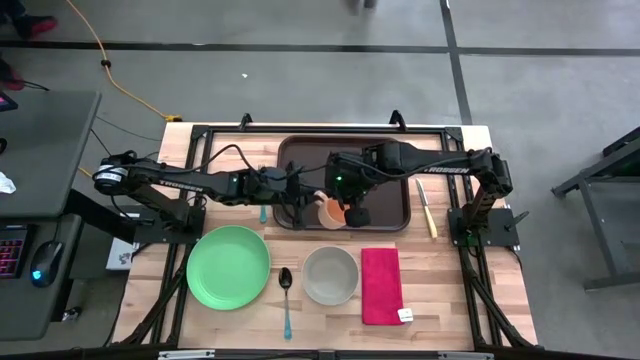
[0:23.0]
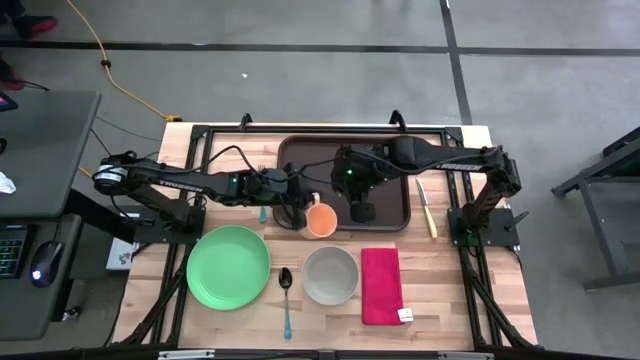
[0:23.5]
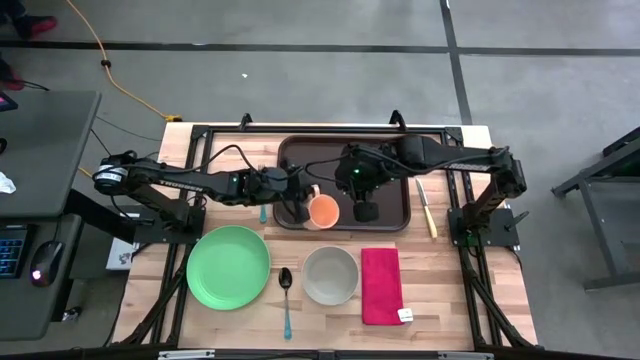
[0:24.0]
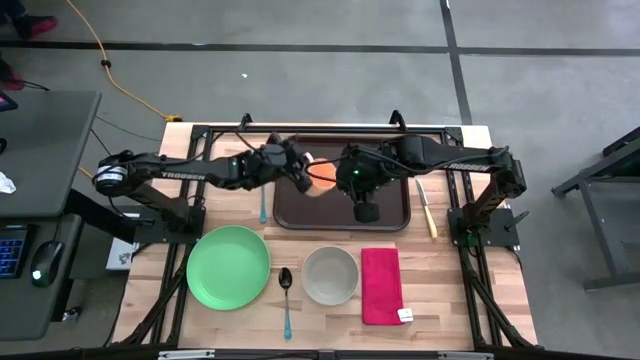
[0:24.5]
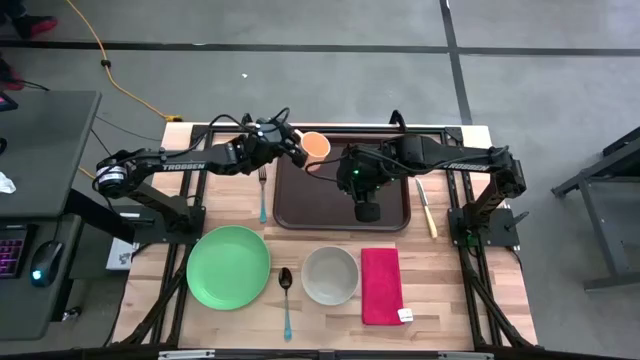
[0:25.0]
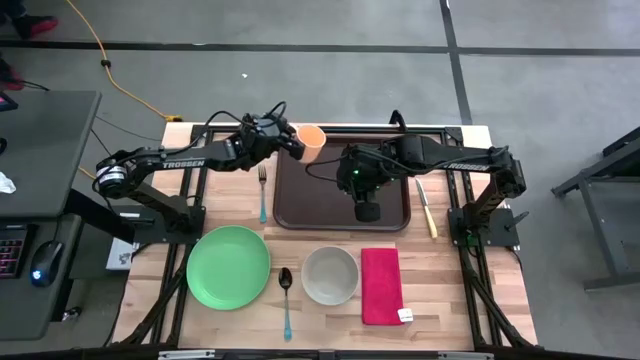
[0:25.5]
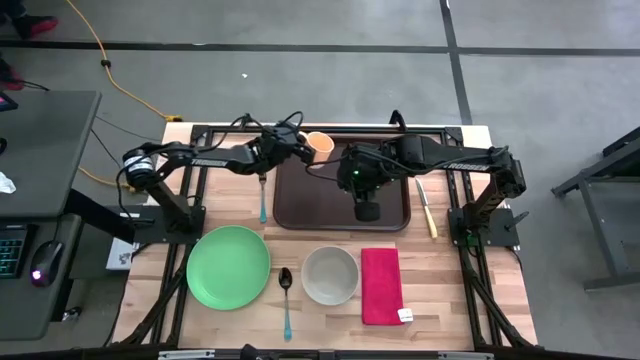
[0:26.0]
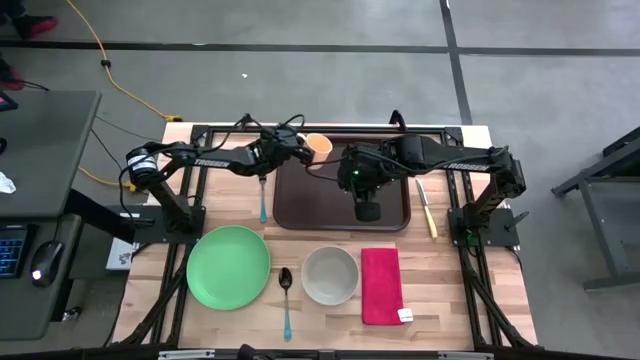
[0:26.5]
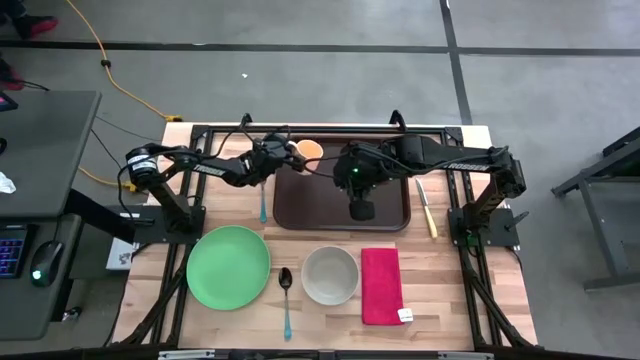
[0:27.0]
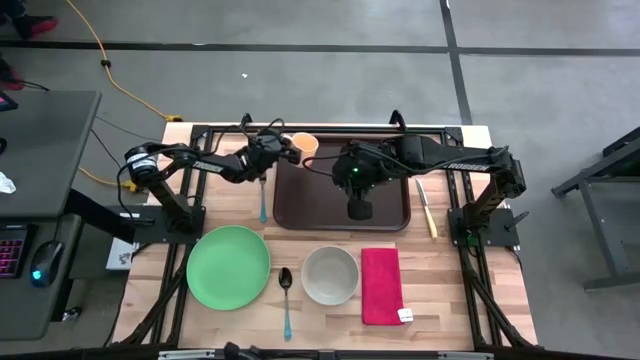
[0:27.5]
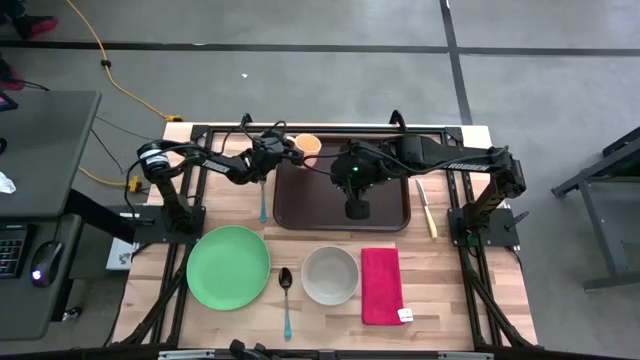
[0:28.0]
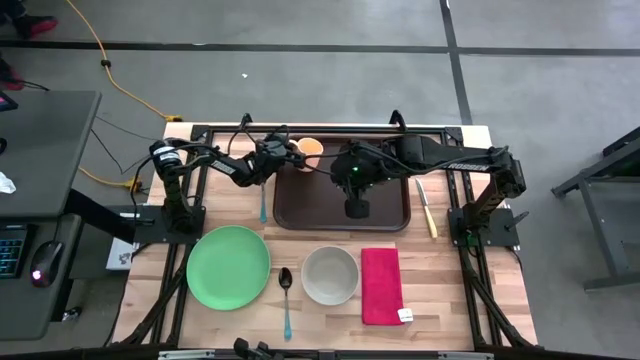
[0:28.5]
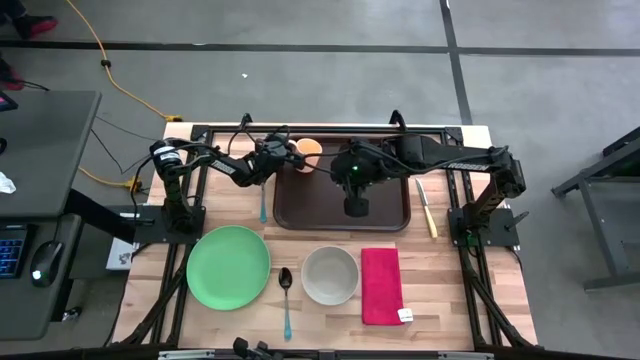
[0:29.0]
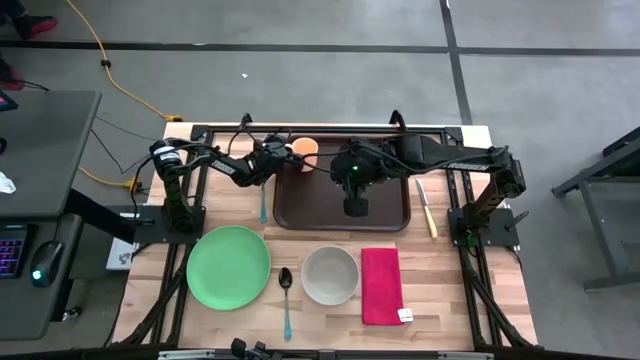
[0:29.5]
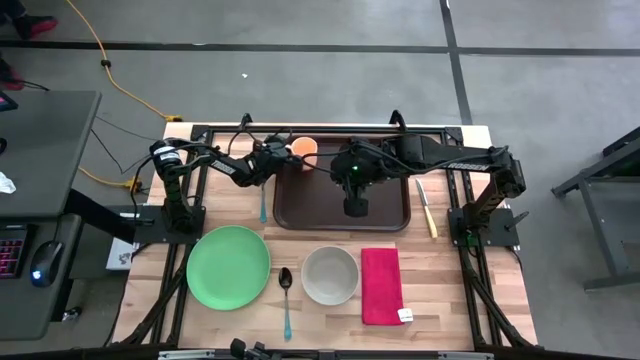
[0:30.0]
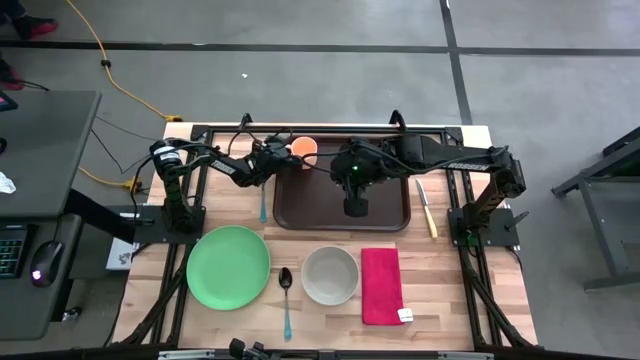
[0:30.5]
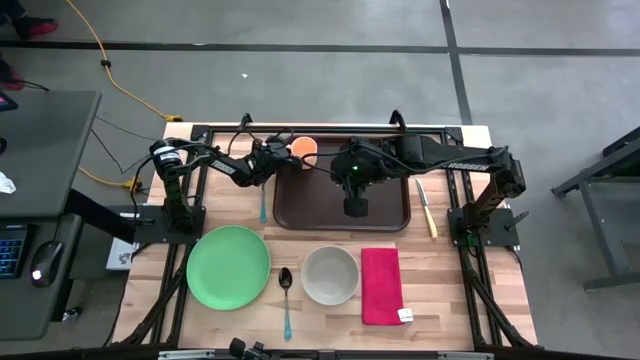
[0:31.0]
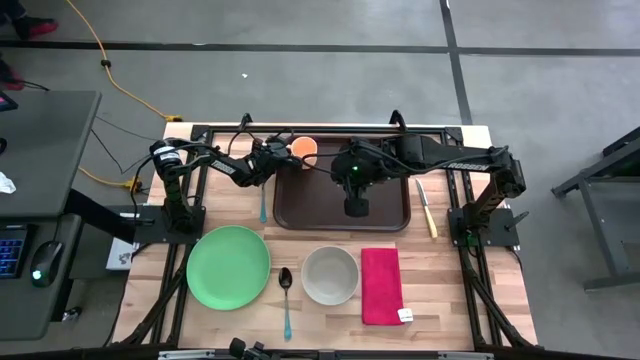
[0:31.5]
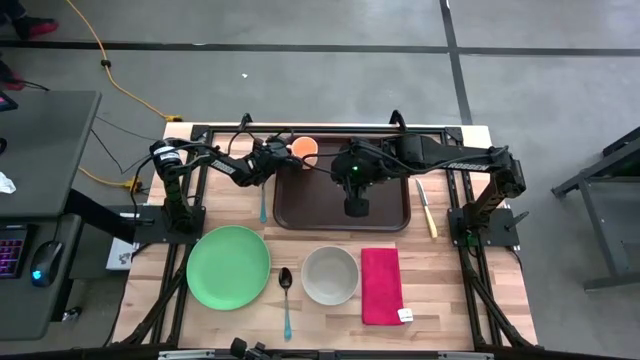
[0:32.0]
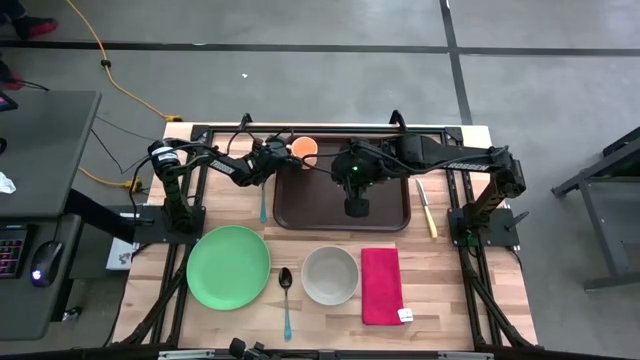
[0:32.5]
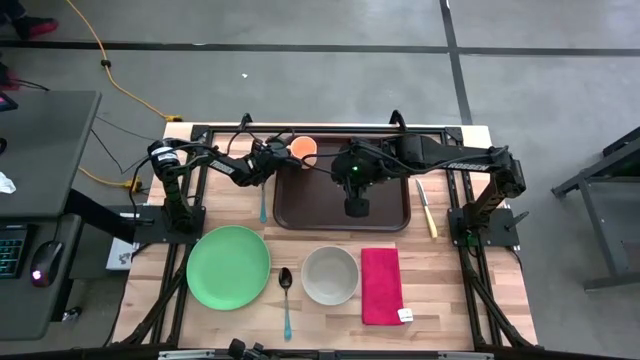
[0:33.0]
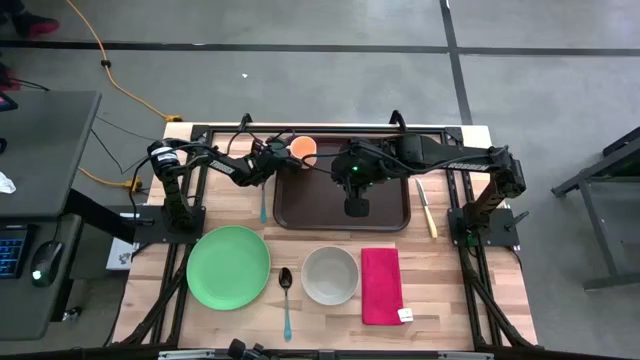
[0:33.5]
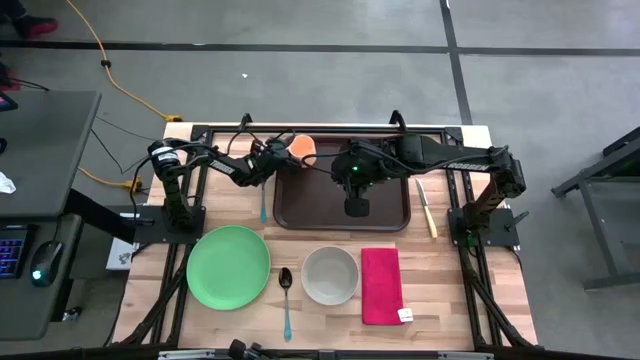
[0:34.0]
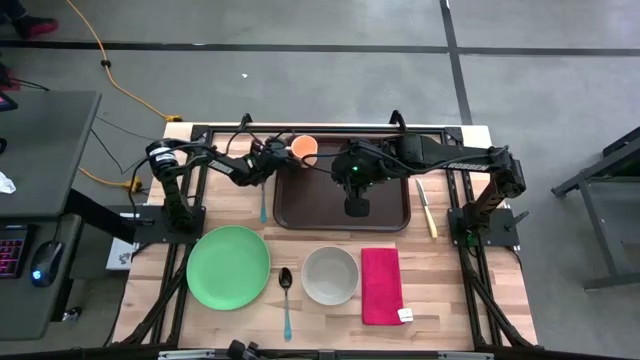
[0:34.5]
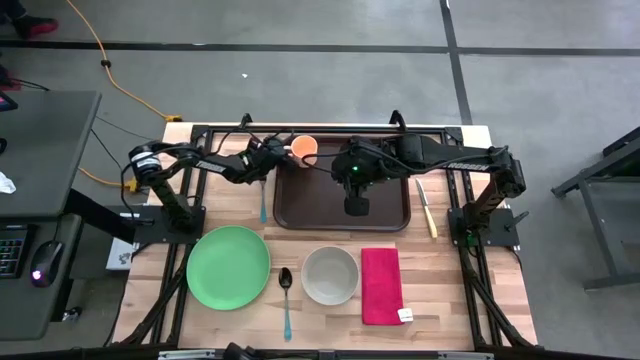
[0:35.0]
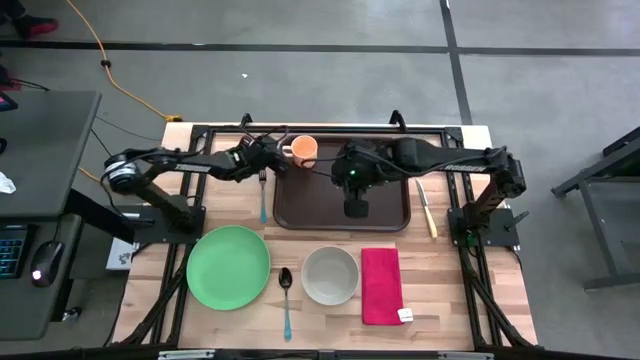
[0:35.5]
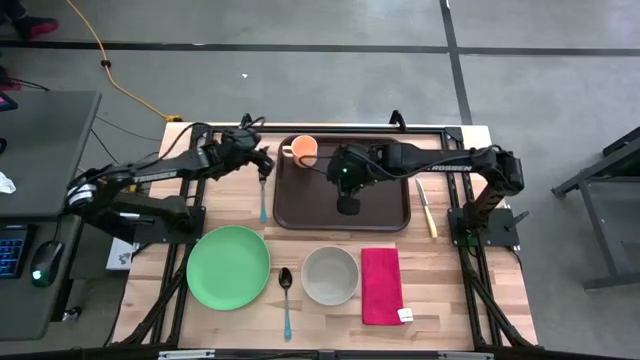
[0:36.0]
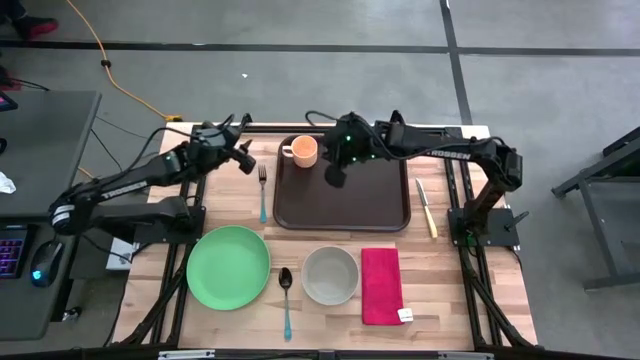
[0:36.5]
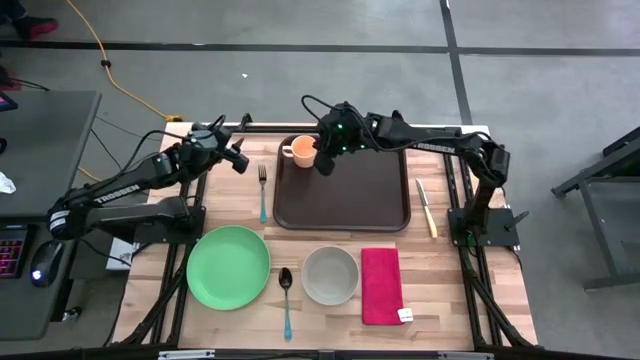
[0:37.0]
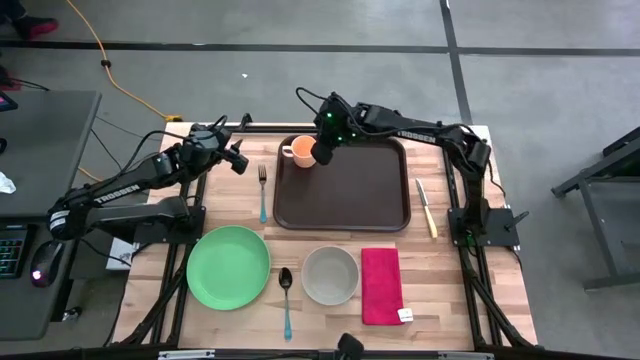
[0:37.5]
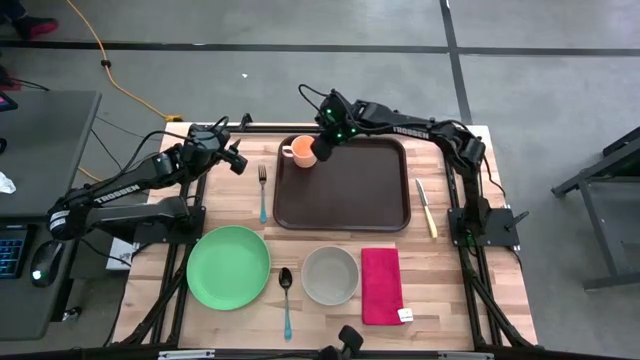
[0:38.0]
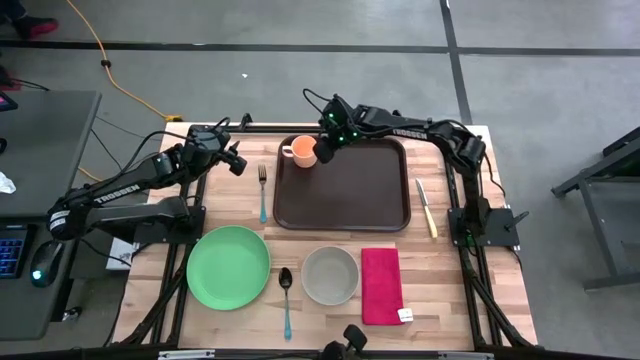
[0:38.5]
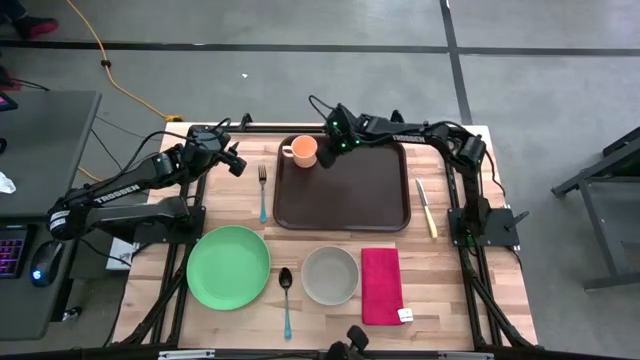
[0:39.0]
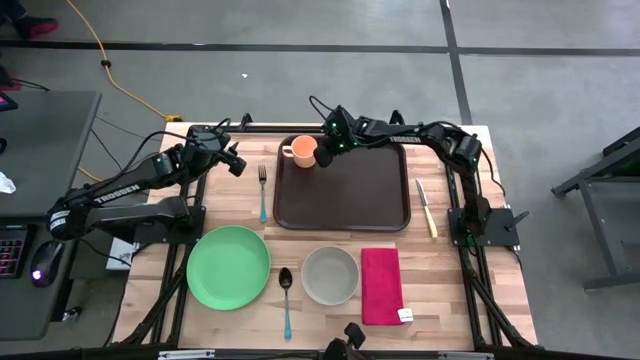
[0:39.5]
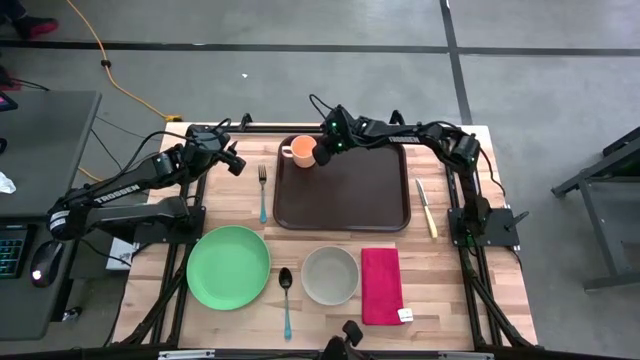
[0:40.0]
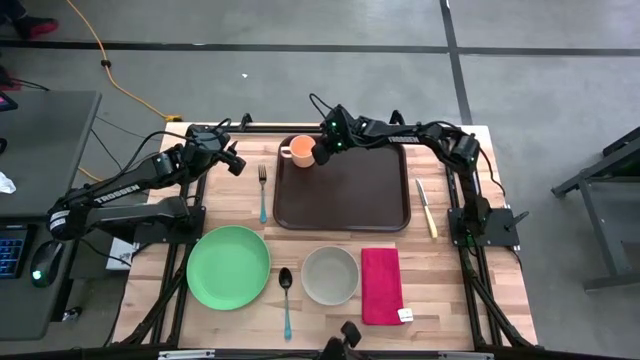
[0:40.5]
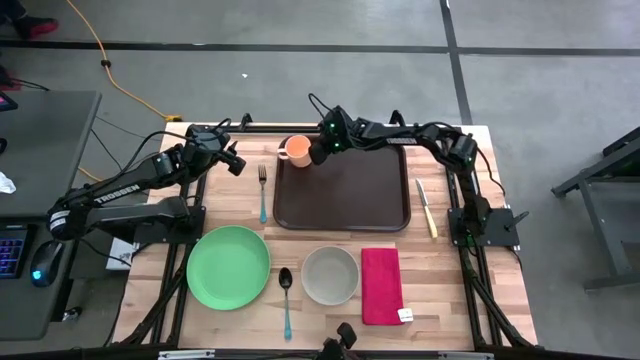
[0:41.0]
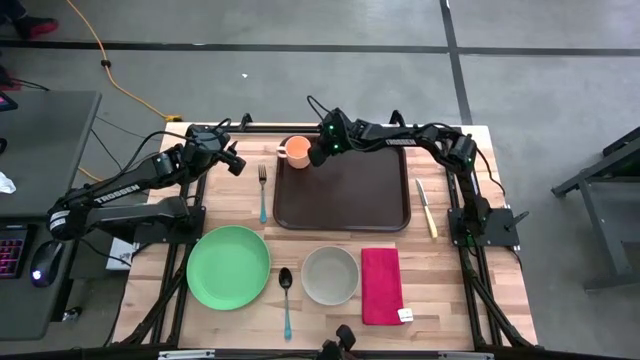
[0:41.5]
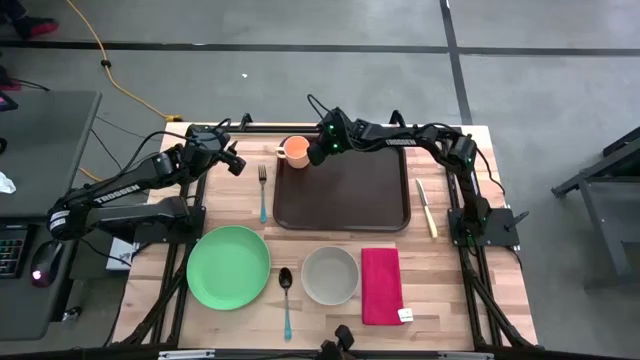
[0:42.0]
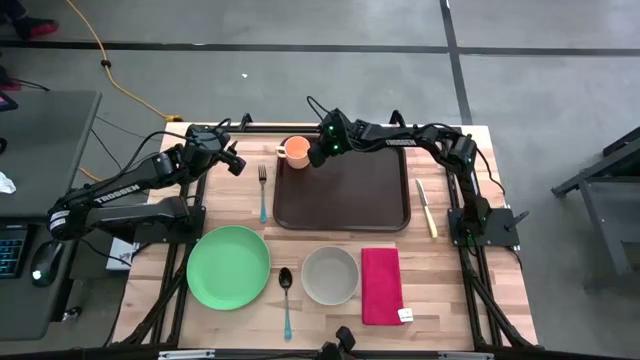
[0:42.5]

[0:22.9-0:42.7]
Task: Set up tray
Put the orange mug on the brown tray

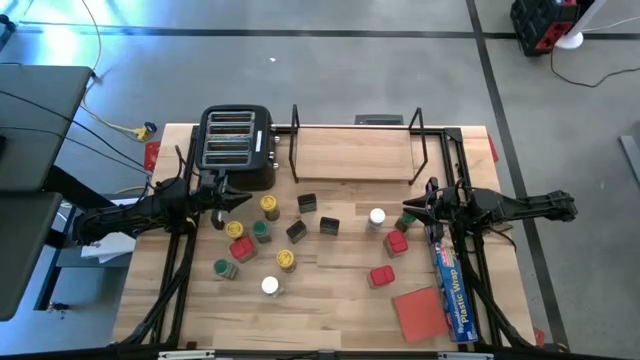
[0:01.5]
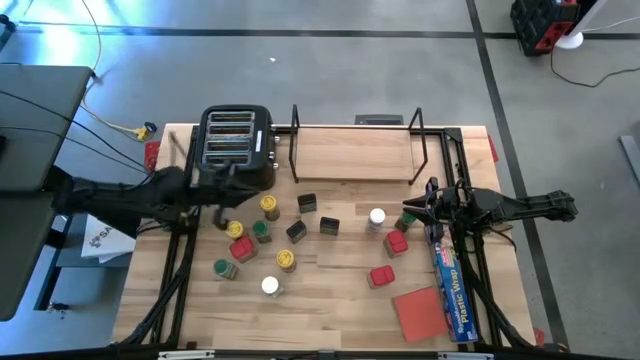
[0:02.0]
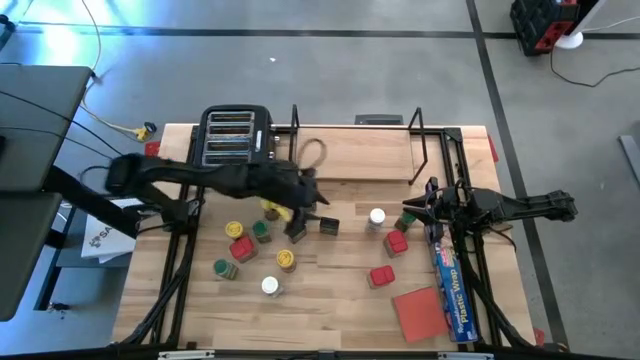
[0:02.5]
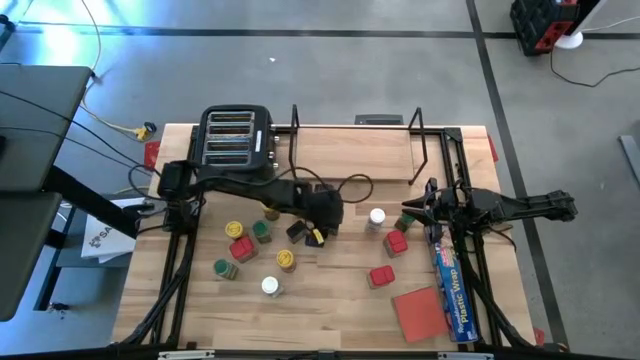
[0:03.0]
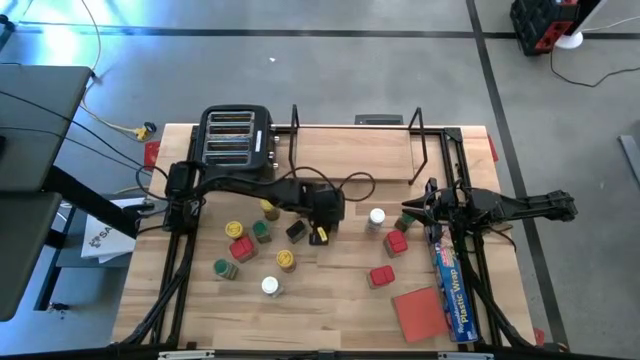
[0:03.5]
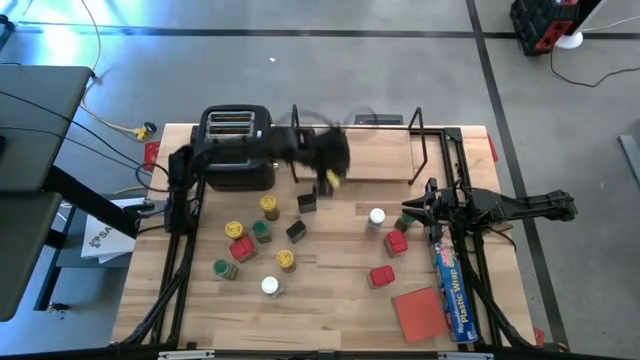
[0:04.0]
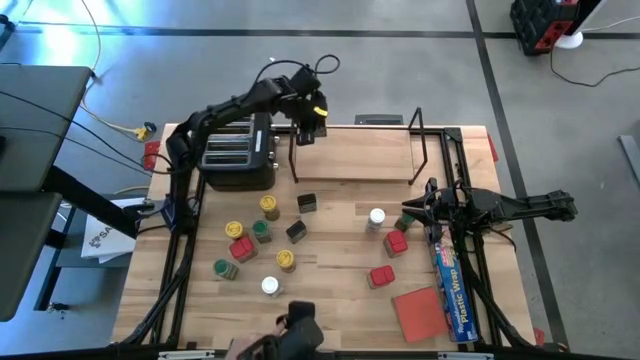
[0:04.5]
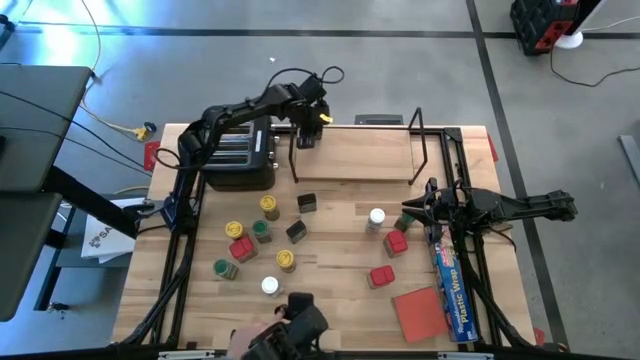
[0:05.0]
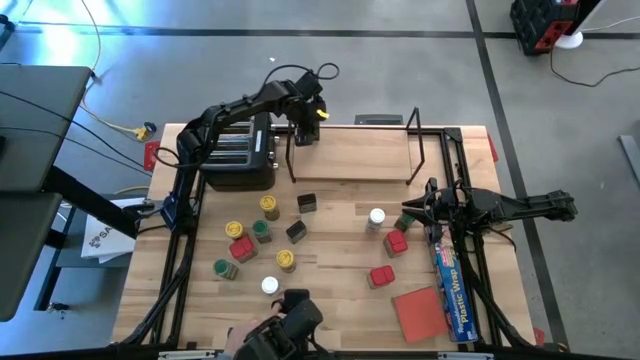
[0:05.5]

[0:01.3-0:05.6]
Task: Shelf spices
Put the bottom right black seasoning can on the shelf
